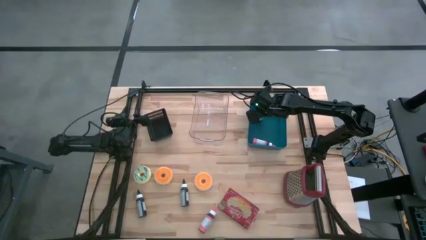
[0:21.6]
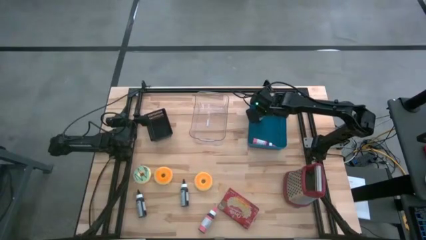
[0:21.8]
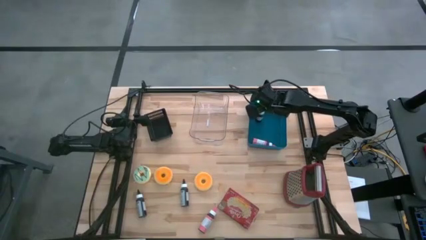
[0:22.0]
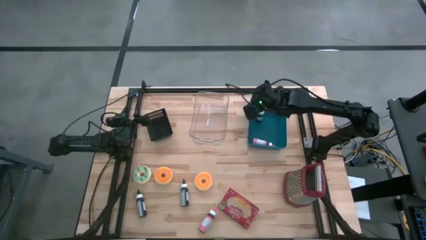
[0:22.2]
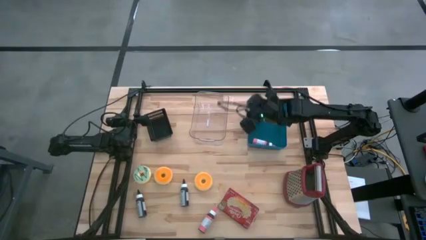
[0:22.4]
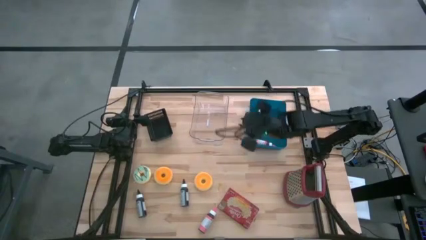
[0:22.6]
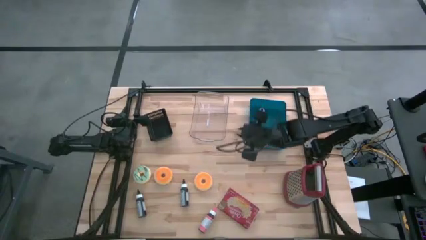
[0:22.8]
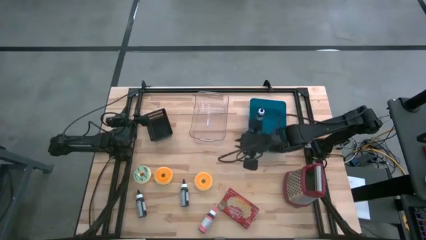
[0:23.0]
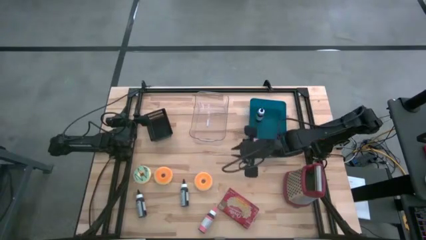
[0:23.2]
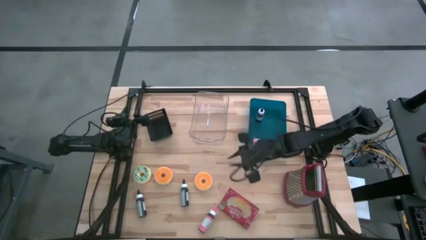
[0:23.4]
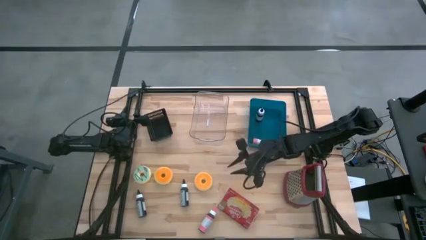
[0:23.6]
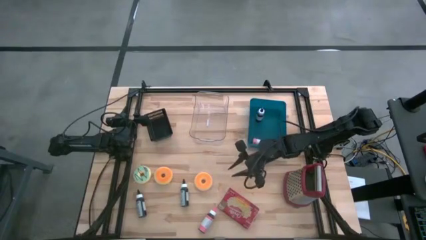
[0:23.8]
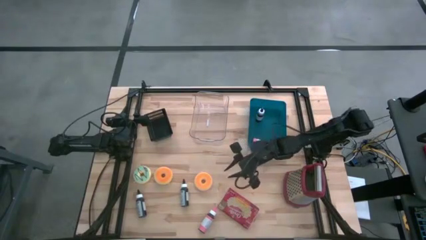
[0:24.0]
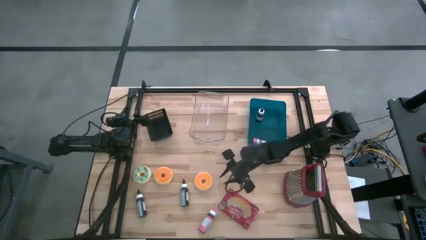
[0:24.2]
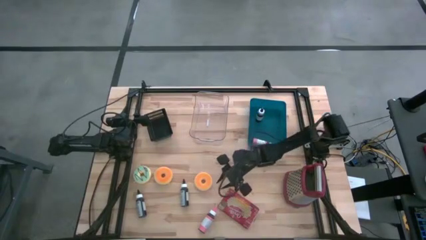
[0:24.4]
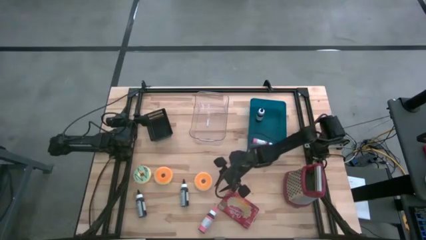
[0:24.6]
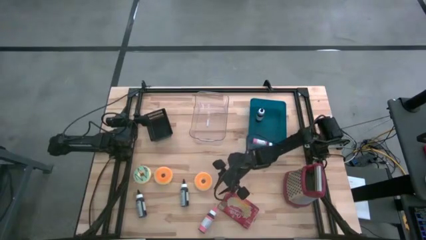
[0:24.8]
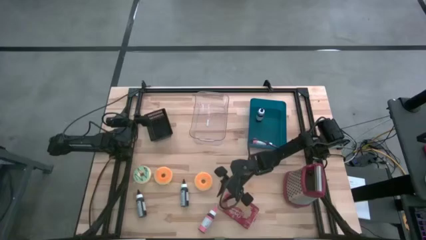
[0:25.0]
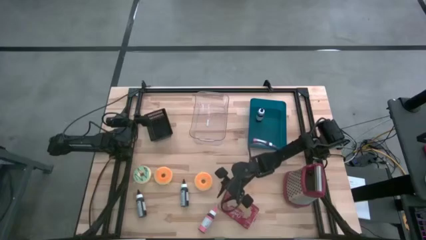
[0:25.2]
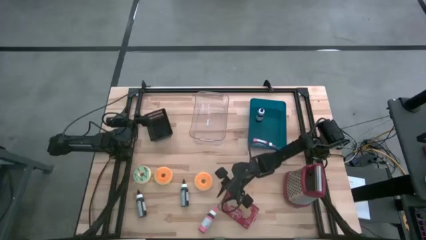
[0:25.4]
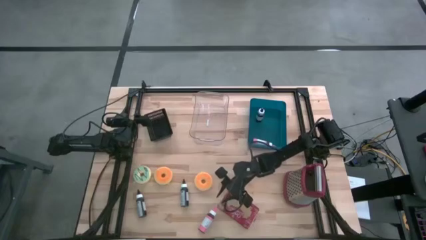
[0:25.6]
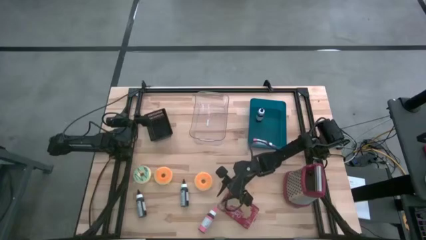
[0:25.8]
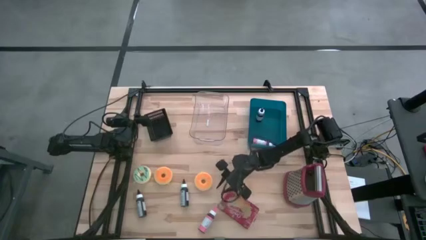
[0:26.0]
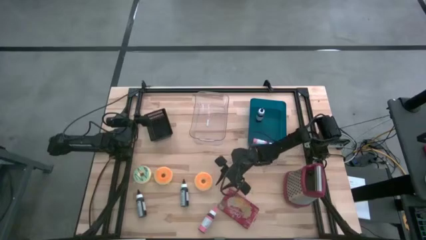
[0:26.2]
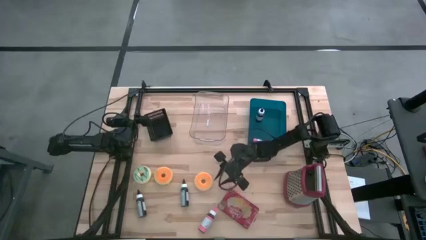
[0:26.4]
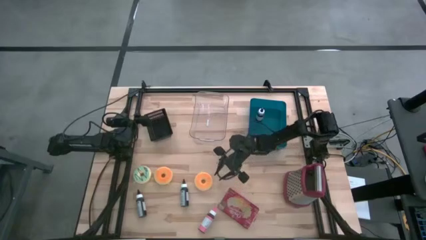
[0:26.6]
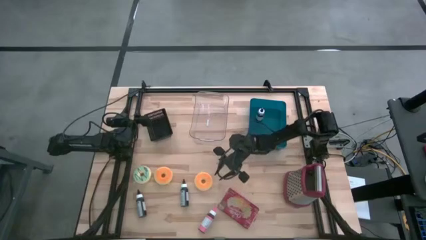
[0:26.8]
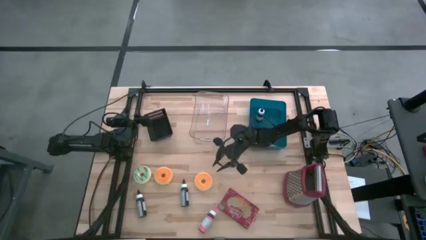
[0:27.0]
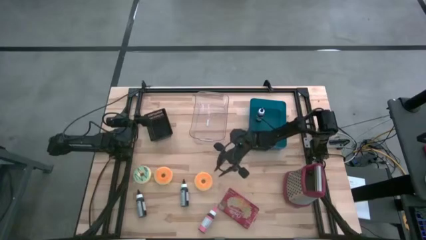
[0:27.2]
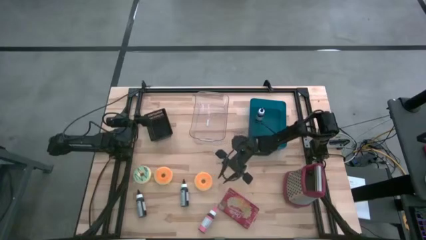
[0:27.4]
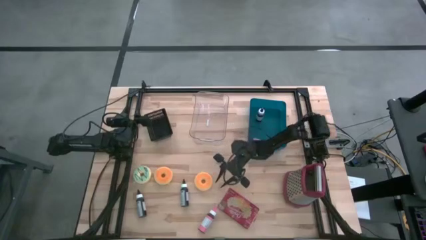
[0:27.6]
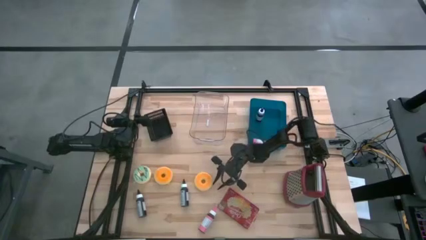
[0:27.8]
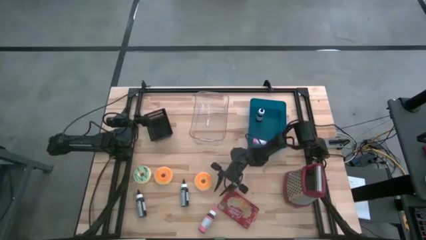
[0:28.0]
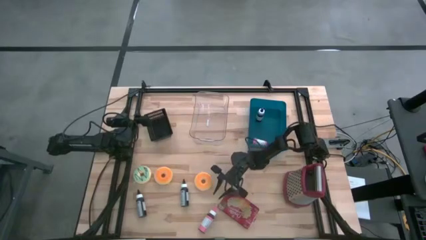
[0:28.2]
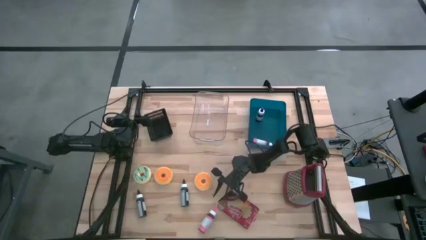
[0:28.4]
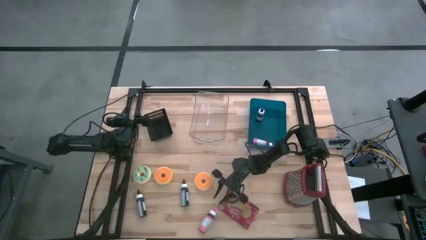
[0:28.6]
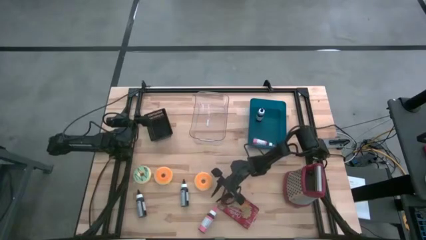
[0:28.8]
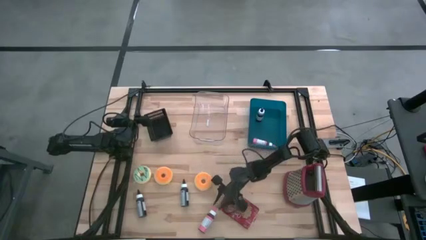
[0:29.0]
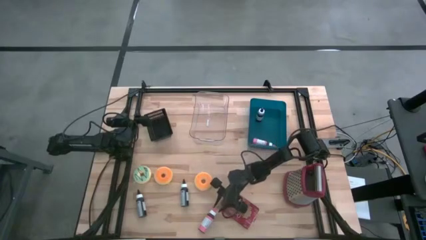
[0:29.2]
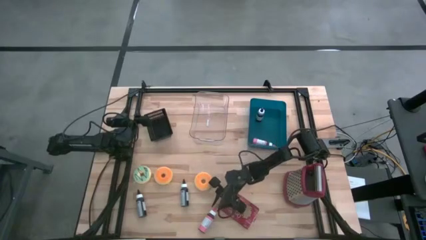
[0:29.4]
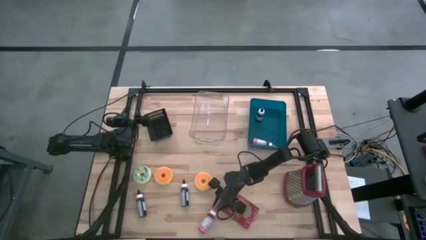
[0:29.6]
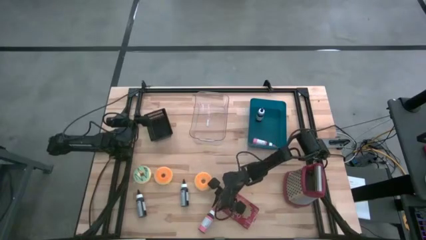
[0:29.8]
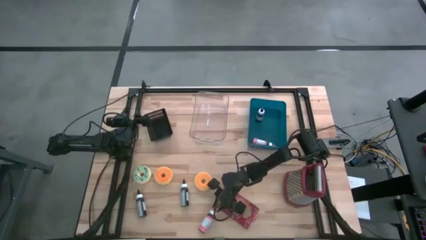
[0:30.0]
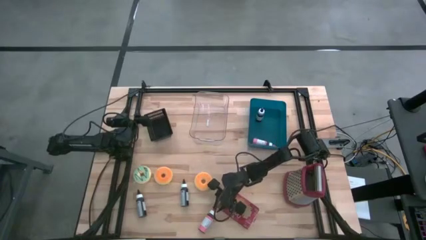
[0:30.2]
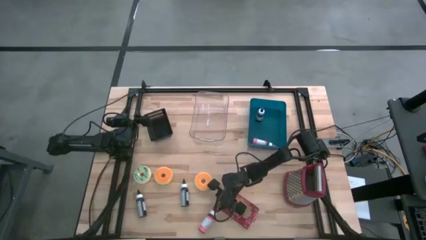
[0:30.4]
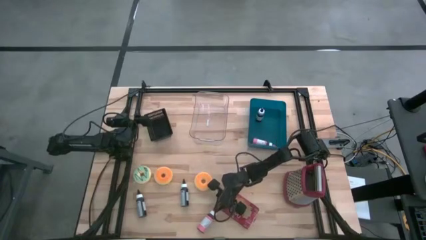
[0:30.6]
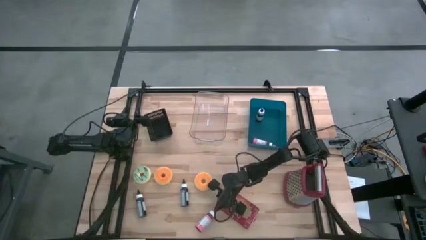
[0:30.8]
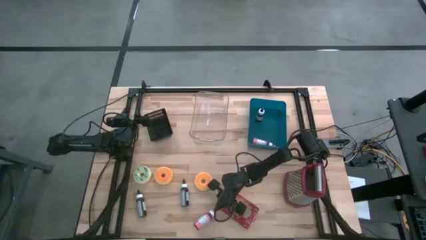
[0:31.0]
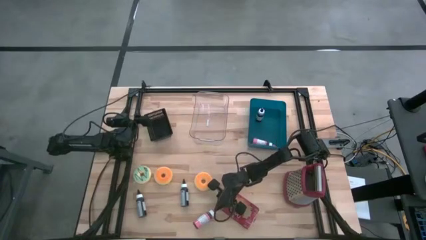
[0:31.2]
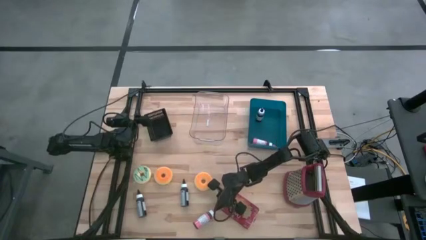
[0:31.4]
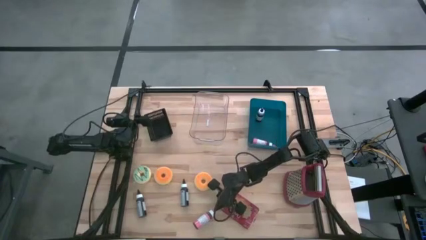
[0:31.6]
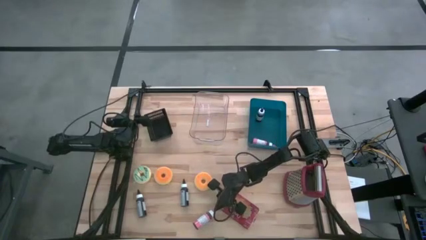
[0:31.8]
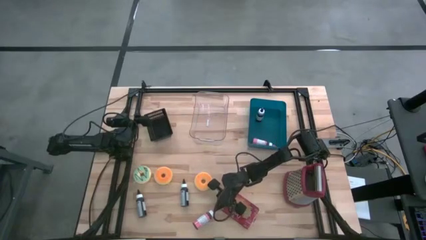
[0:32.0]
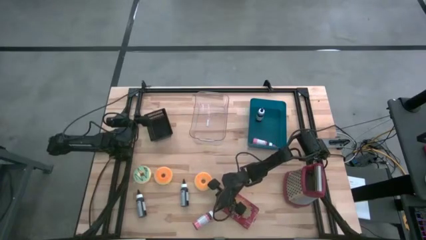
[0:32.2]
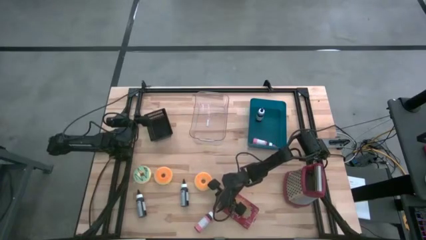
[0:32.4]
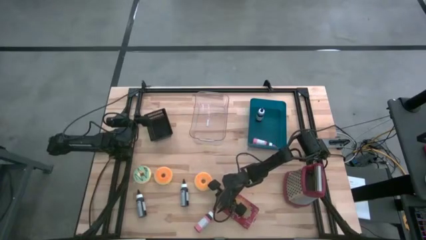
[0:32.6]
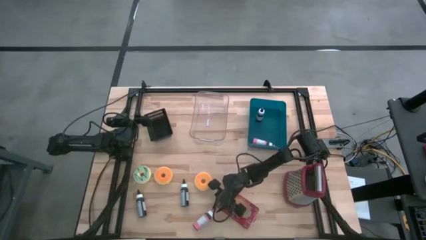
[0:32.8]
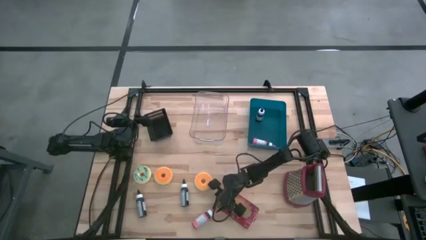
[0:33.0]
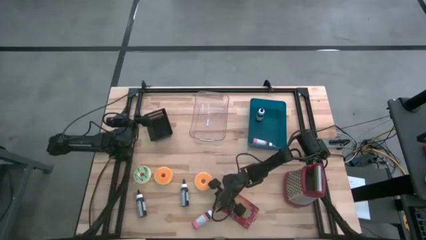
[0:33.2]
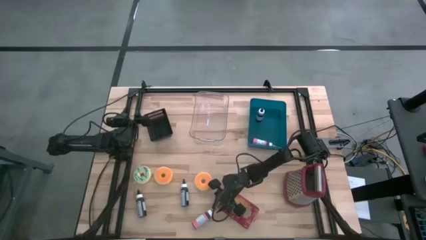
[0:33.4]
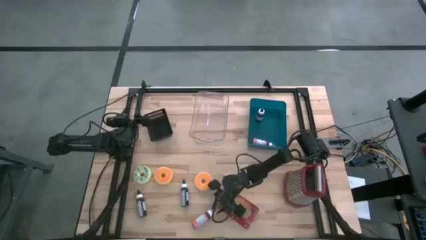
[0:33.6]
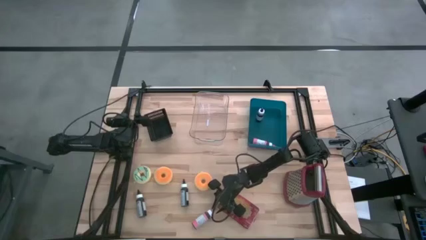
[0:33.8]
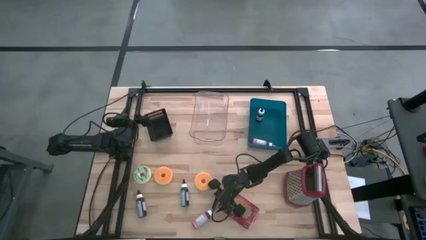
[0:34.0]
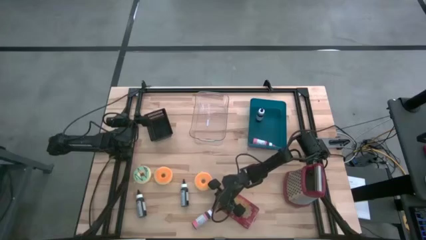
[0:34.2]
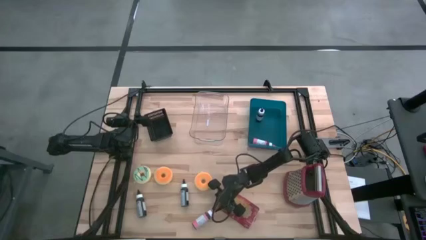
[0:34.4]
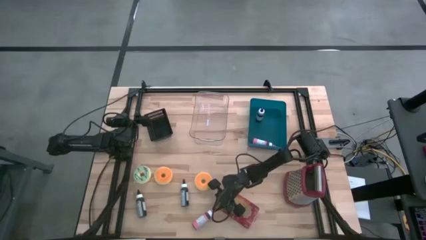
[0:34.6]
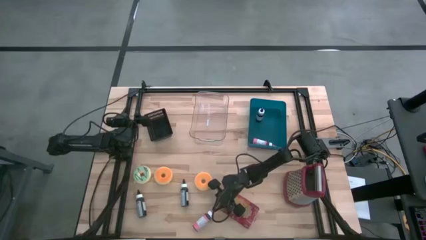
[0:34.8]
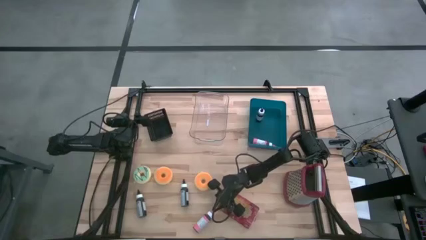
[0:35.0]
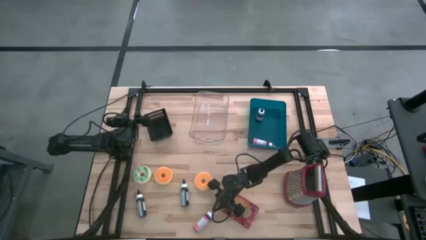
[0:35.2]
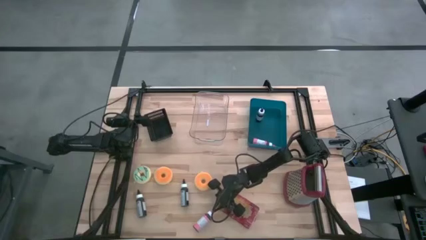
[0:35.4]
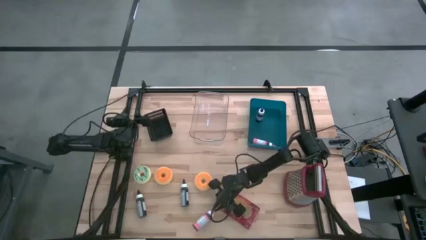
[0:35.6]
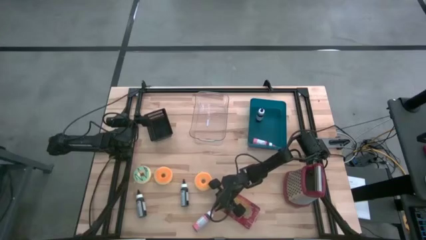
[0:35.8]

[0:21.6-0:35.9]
Task: Pick & Place Food Item
Put the pink food coloring bottle into the blue bin
